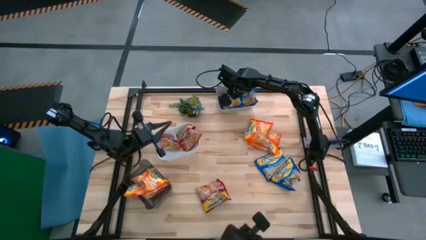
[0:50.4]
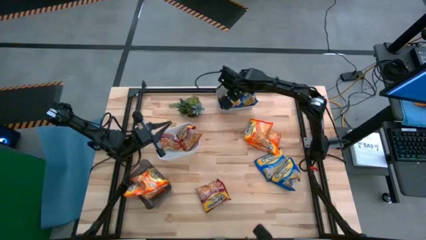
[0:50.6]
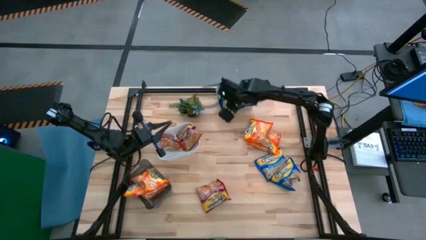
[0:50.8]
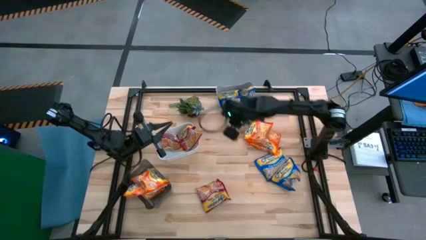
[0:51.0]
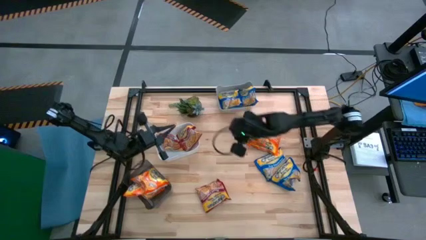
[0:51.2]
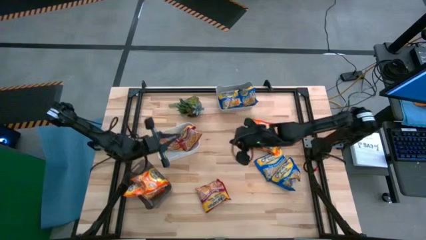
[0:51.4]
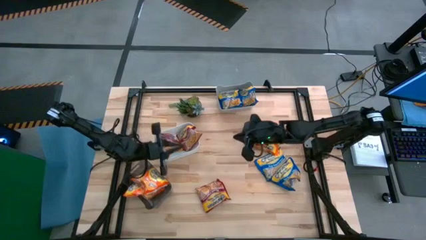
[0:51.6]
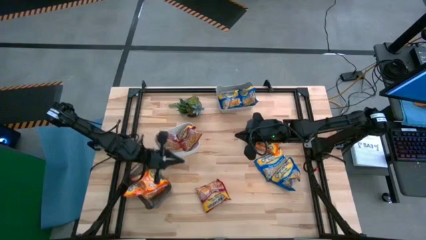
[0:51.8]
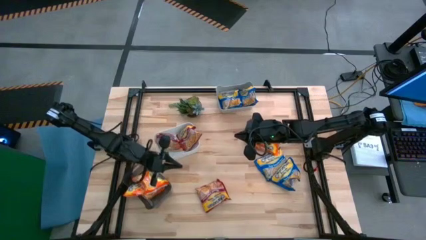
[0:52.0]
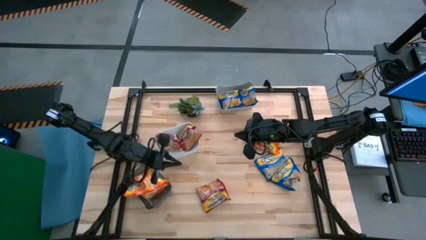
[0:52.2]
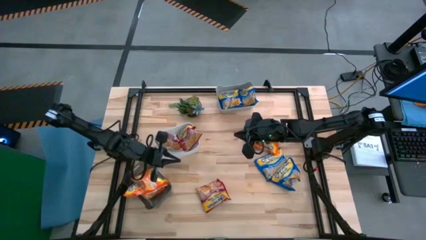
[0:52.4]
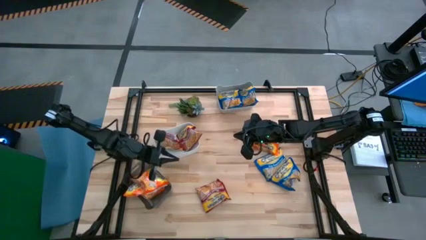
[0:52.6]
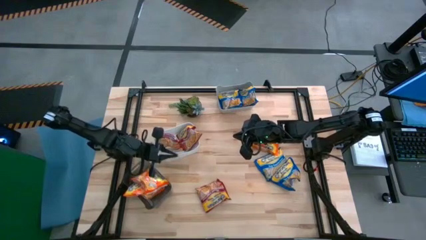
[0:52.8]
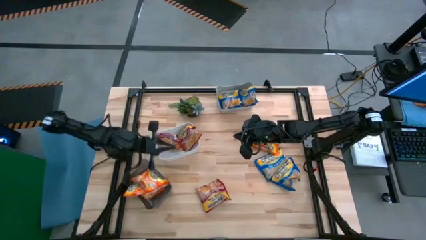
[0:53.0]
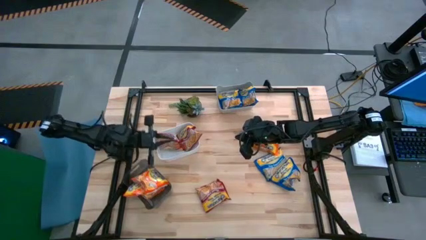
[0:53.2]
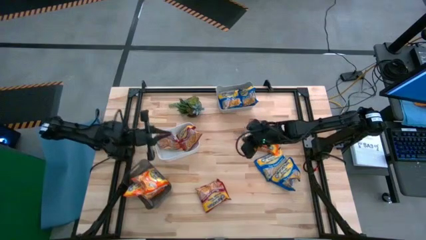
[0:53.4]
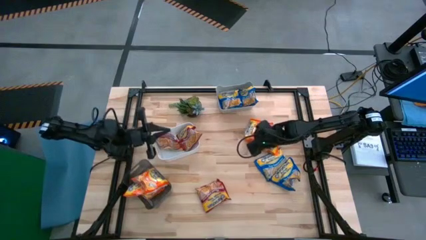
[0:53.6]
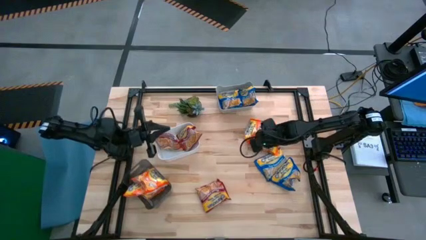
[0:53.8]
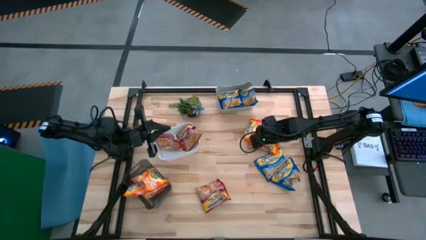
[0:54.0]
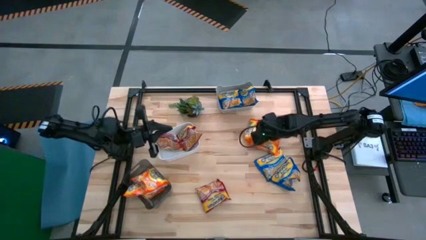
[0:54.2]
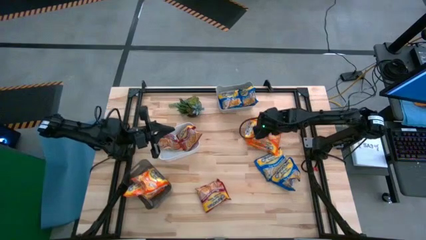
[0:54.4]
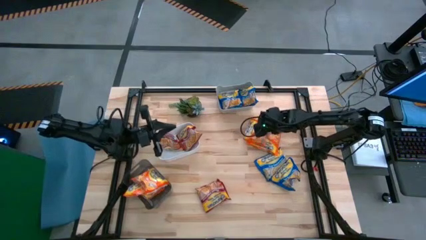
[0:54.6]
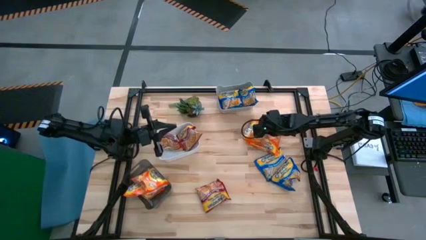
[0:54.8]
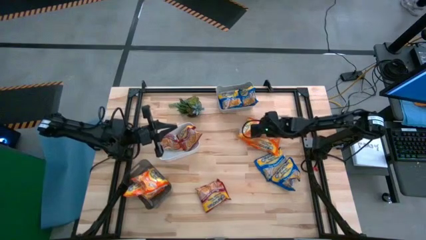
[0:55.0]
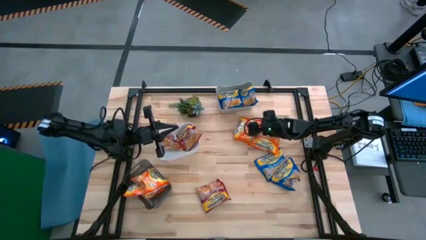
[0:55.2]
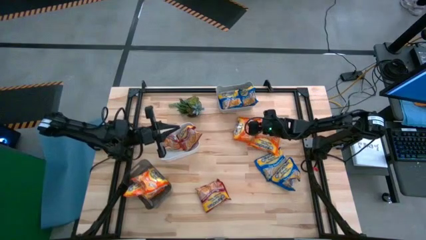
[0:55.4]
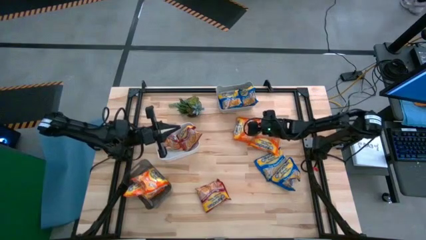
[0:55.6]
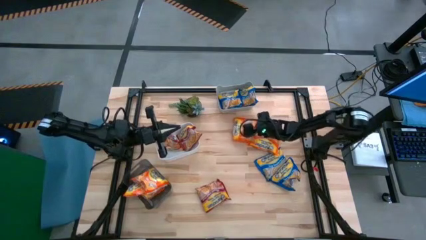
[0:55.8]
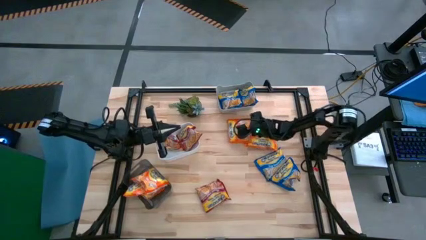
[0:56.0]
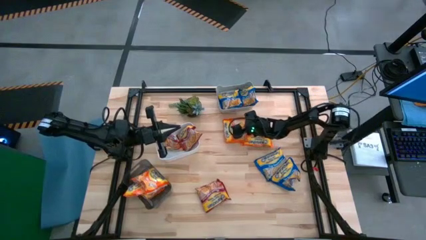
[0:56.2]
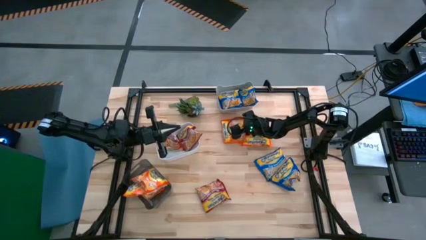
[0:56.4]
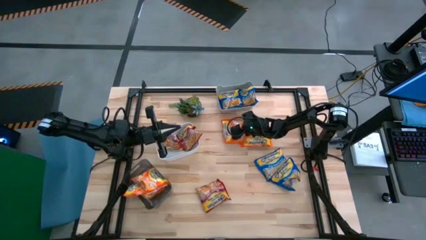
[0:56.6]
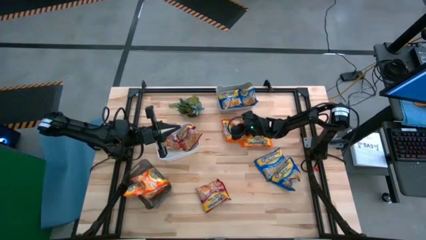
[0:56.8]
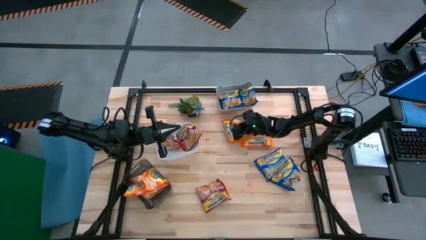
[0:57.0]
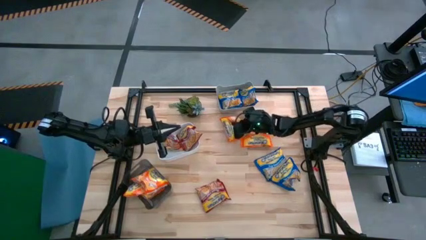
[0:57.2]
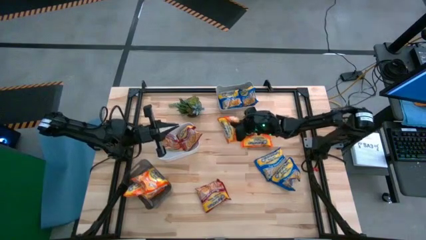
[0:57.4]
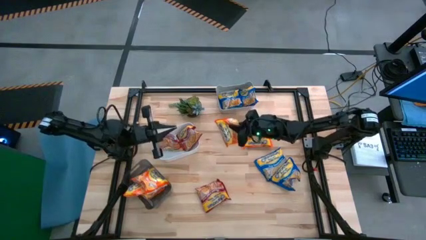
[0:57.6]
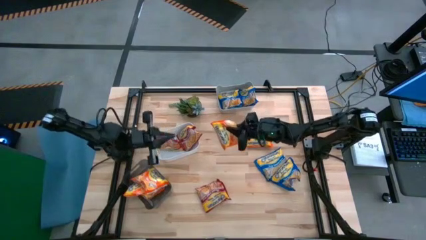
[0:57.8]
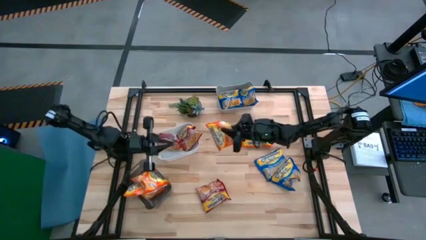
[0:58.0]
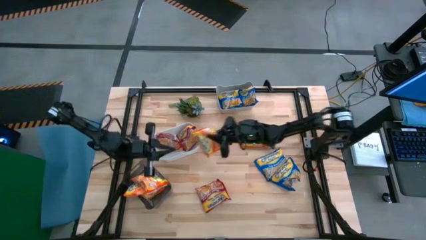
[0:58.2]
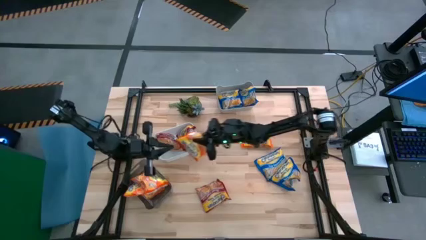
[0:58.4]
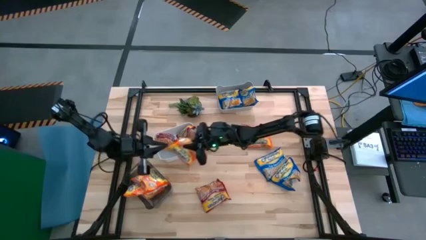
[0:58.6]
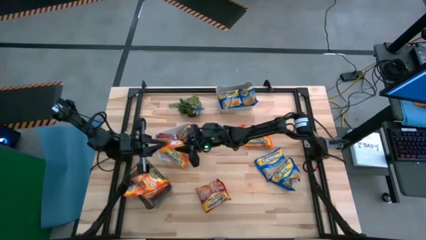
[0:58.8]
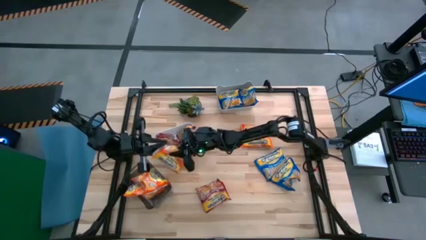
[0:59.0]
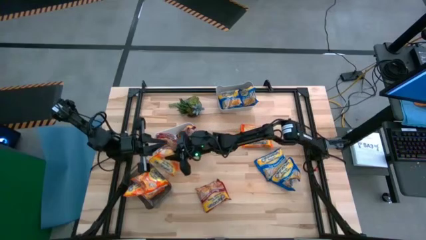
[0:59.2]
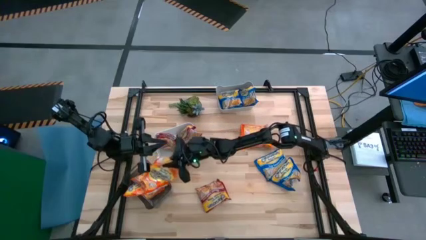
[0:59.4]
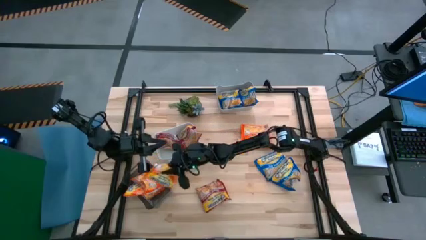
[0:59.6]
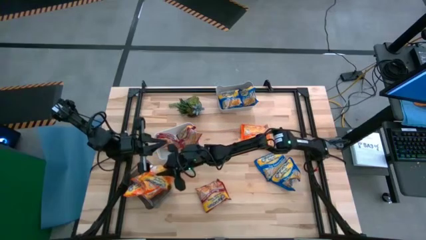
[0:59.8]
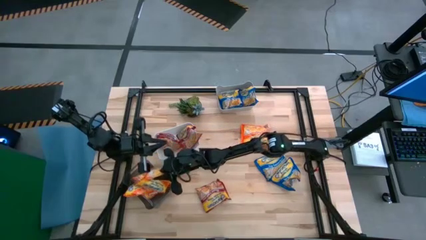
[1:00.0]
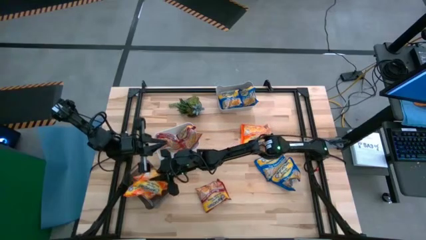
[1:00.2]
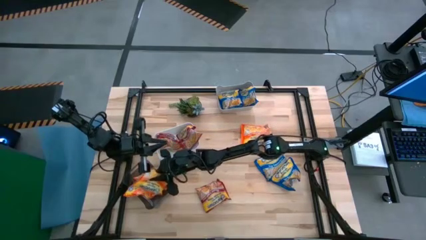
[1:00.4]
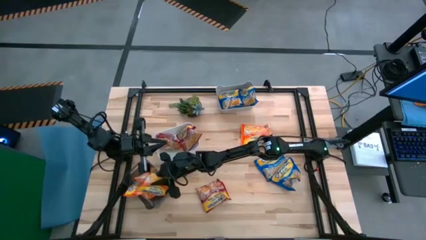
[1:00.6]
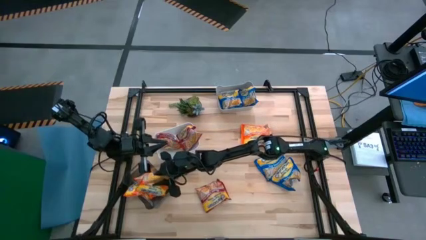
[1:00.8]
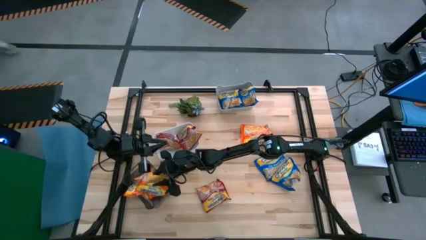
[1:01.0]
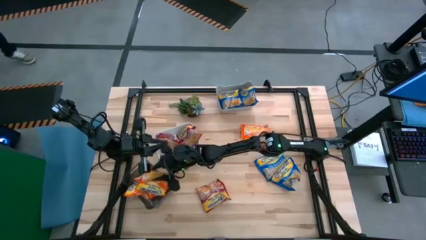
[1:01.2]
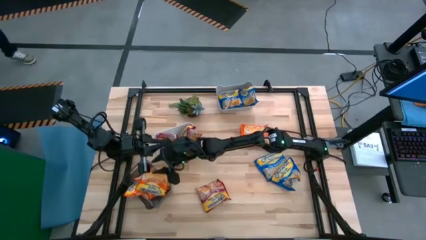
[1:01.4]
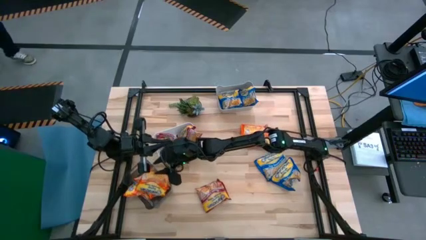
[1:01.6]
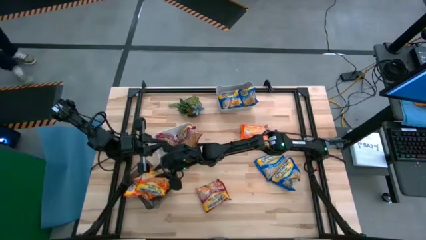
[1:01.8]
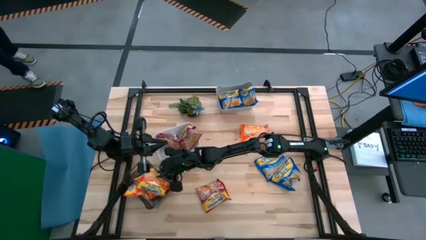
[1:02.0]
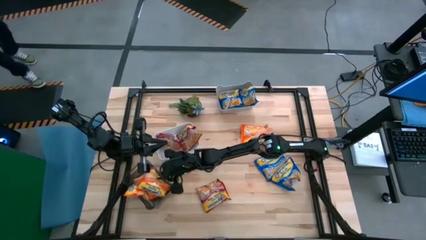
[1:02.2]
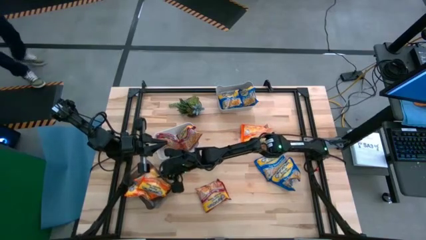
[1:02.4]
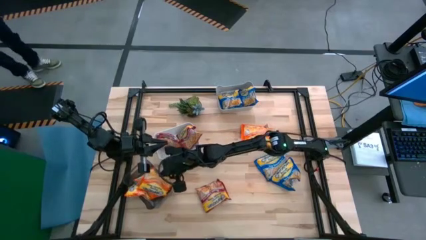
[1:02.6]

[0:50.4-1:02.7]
Task: Sort Maruchan noodles
Put the orange noodle pack into the black bin
